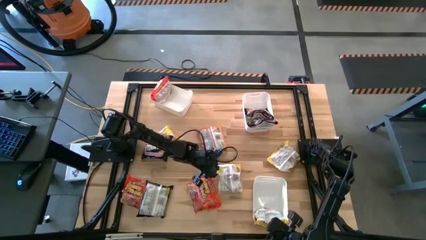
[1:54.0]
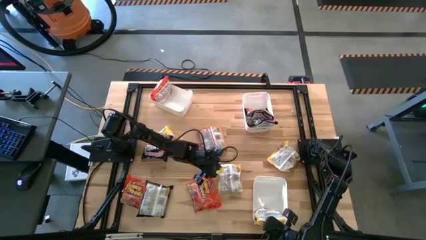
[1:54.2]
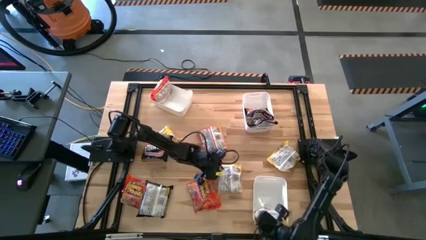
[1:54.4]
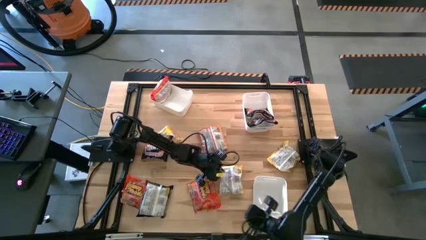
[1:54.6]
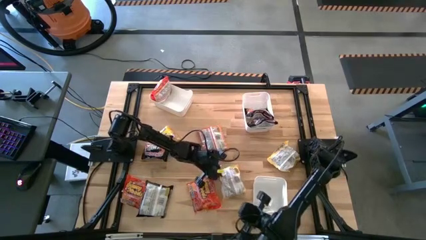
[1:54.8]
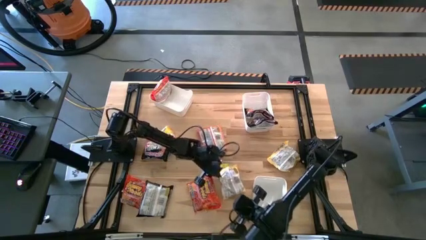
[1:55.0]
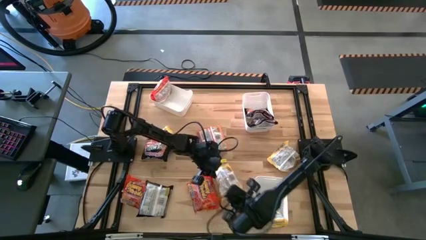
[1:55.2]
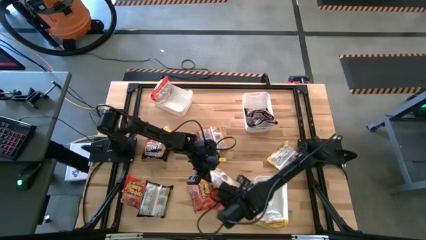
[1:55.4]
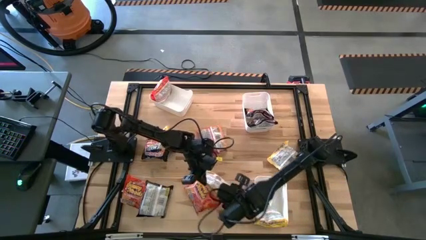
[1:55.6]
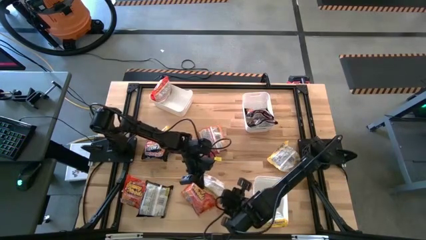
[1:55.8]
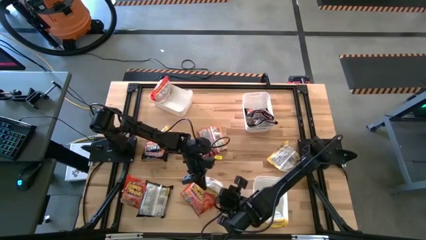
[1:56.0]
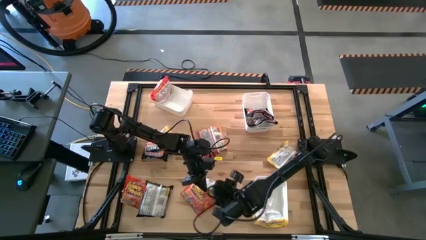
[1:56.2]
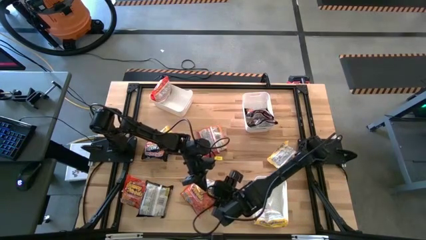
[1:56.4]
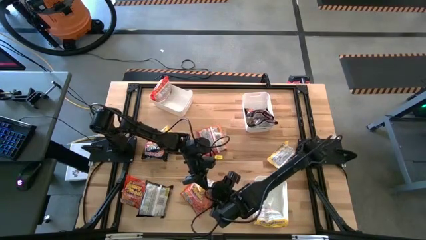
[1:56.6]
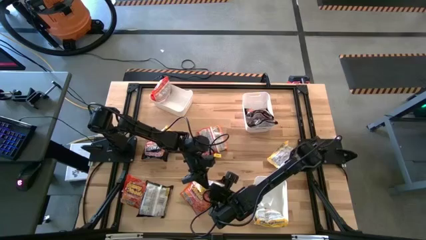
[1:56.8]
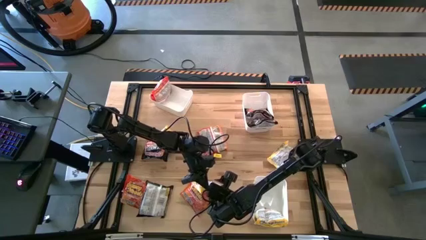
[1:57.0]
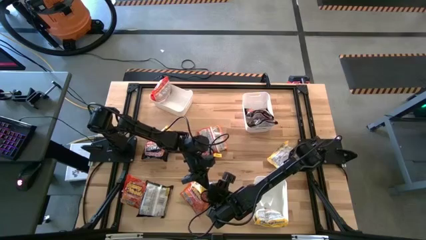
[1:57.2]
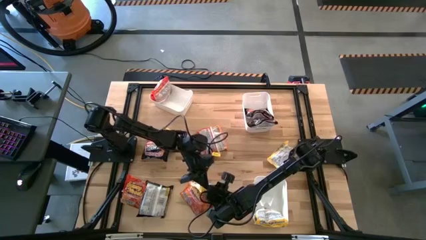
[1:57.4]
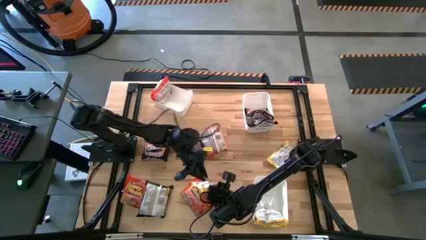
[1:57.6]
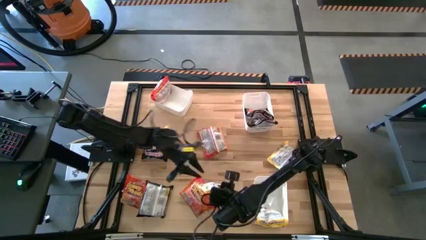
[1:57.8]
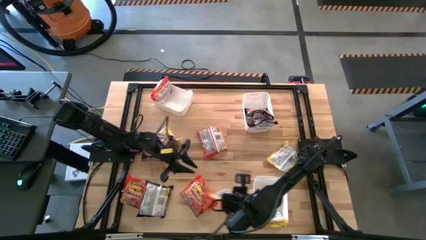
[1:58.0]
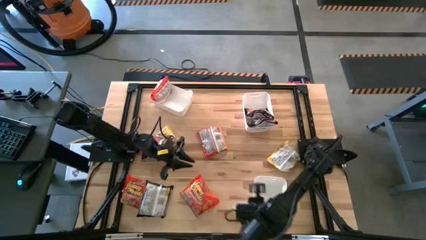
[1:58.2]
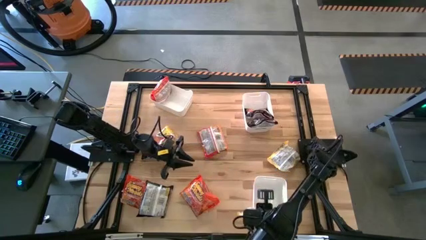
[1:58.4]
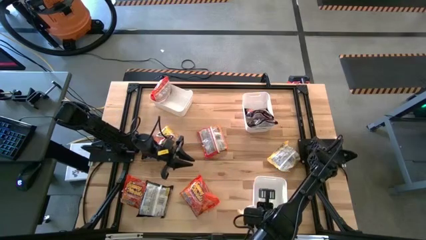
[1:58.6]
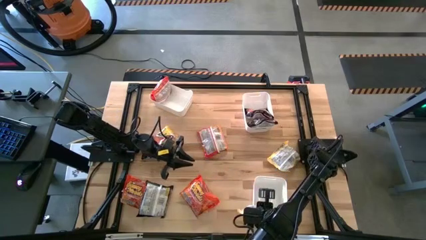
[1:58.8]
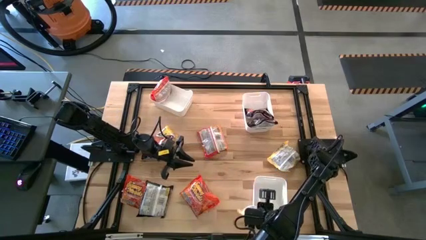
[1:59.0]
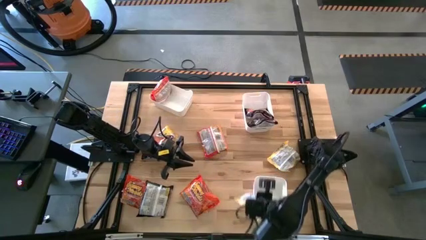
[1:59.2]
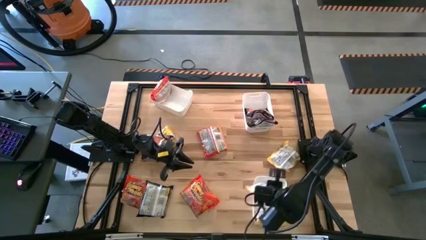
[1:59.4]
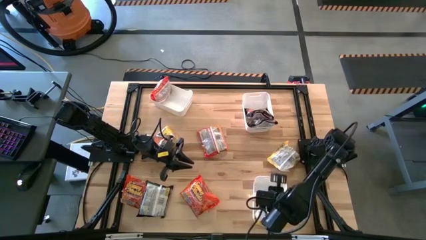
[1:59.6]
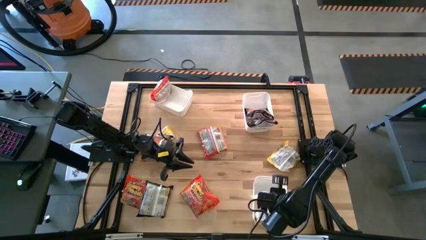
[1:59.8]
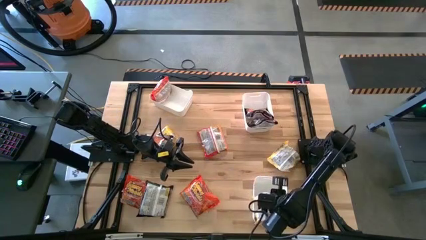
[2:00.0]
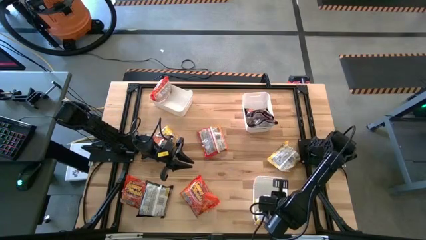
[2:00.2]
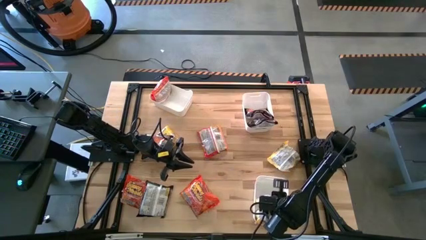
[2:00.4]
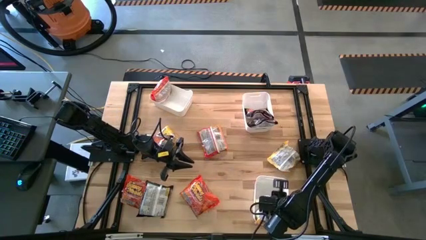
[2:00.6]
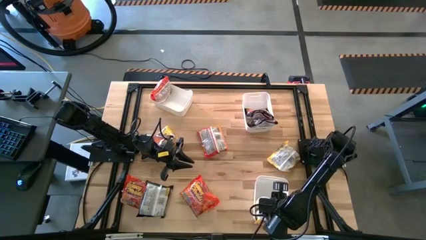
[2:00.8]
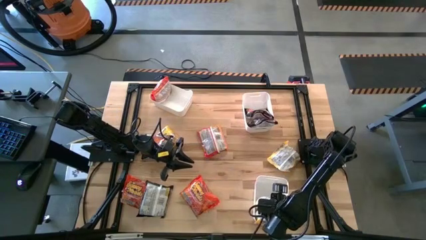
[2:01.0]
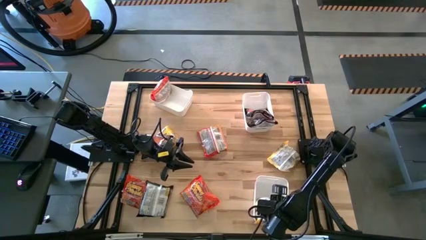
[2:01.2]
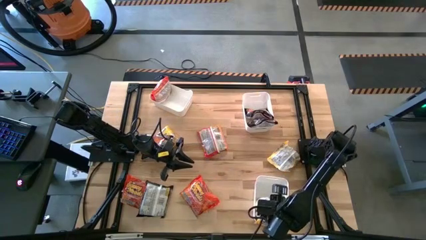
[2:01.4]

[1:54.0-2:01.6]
Task: Sort Maruchan noodles
Put the yellow noodle pack into the bottom white bin

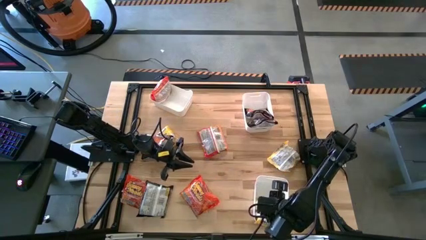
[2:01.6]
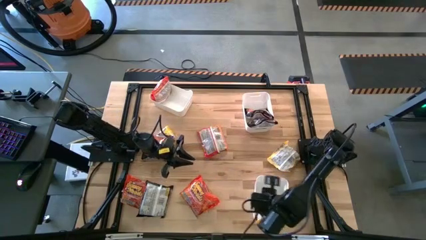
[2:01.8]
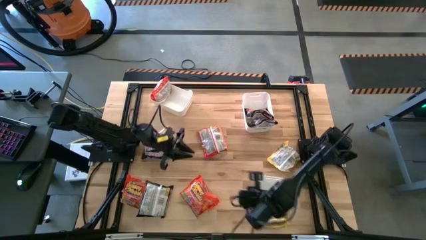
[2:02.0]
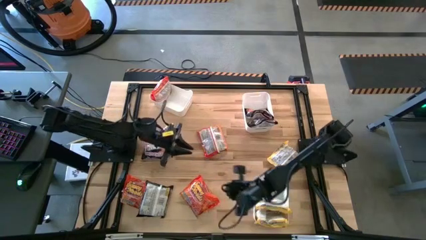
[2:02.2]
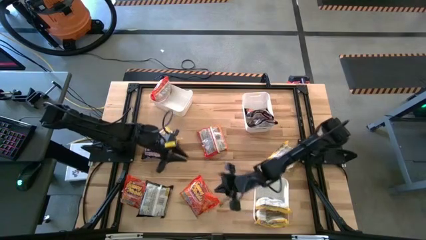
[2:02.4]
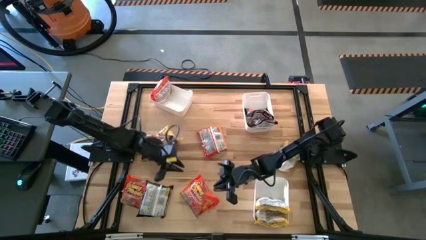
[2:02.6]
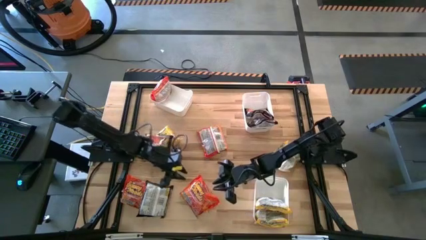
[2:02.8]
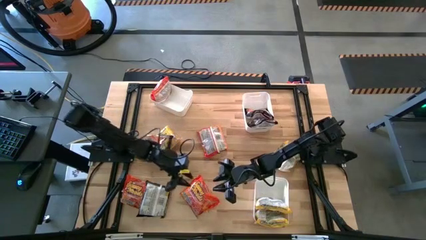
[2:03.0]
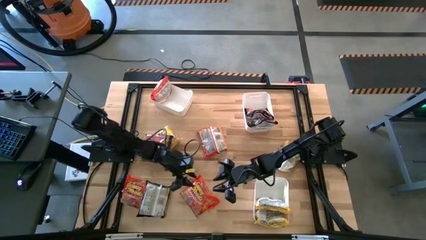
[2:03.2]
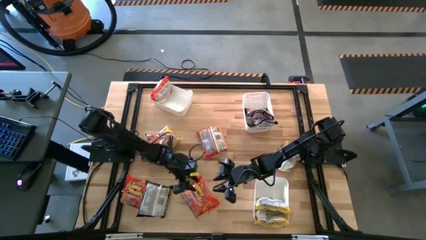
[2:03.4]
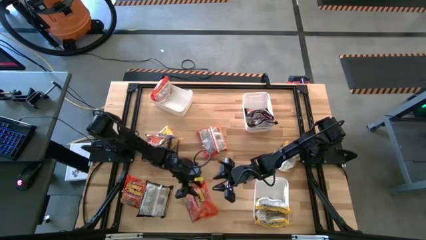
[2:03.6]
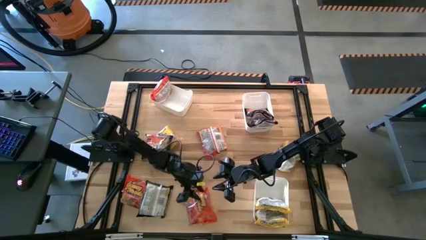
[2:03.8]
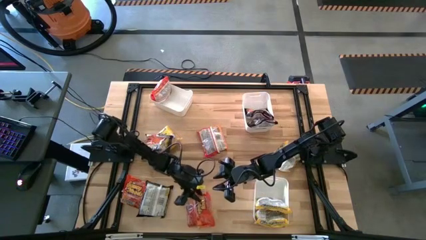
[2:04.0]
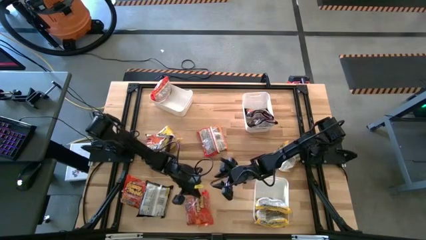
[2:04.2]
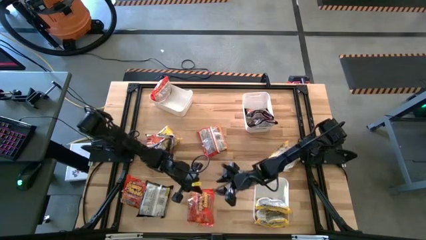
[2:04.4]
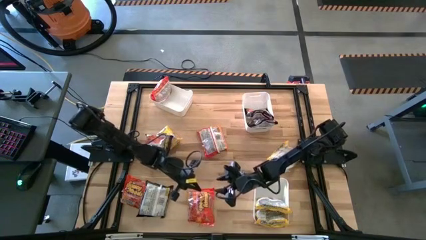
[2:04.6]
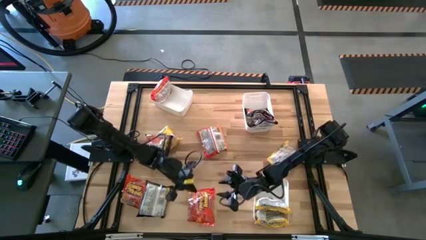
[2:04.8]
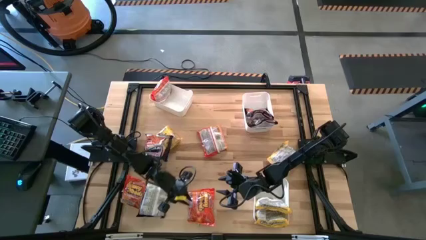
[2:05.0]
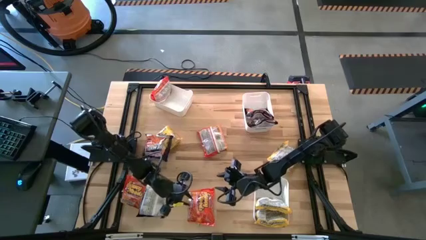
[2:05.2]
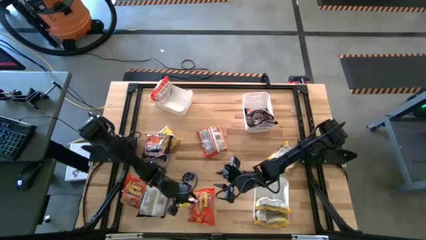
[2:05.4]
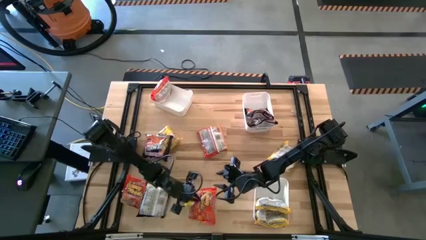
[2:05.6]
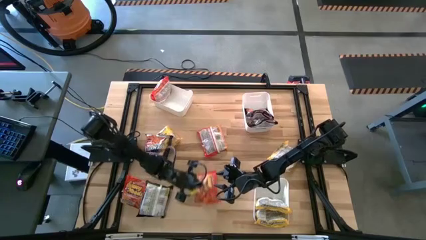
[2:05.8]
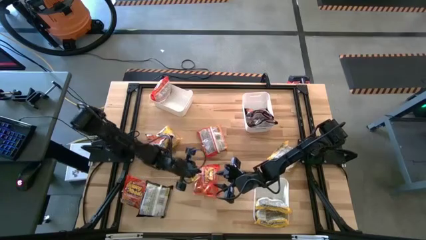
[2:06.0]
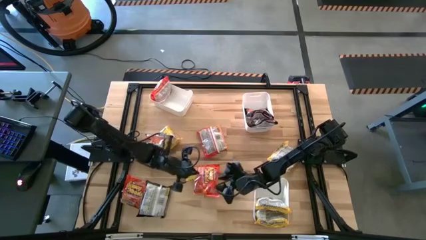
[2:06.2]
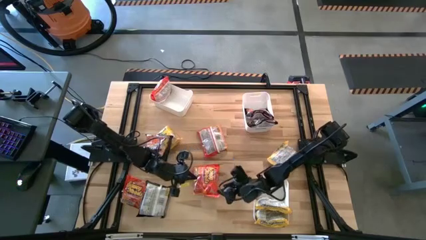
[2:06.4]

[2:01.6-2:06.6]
Put the orange noodle pack into the top left white bin

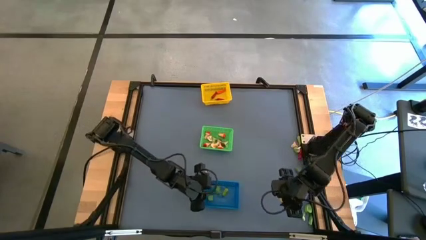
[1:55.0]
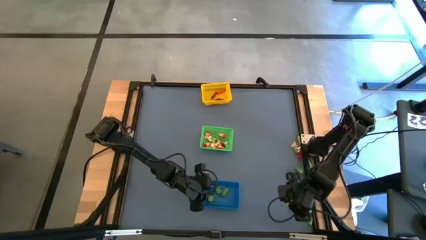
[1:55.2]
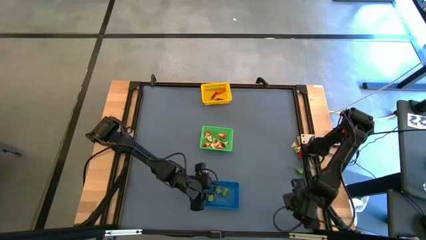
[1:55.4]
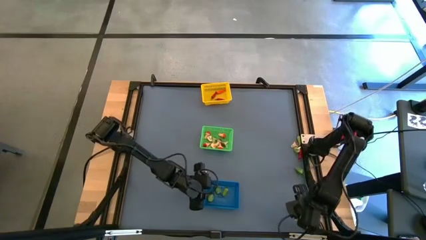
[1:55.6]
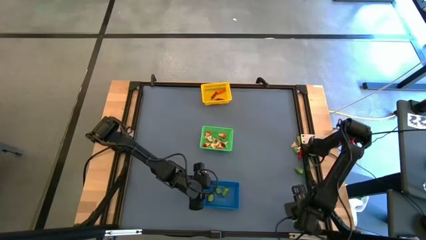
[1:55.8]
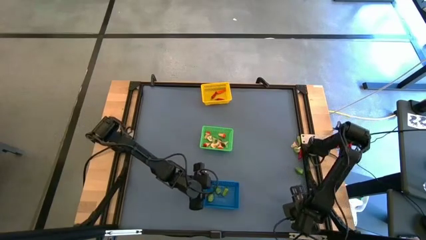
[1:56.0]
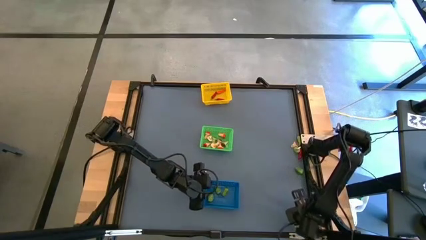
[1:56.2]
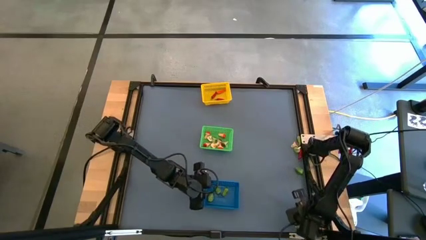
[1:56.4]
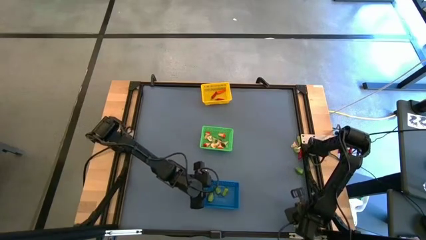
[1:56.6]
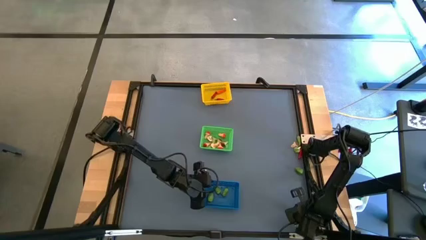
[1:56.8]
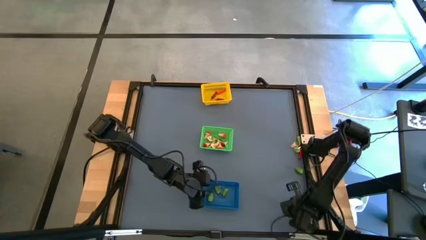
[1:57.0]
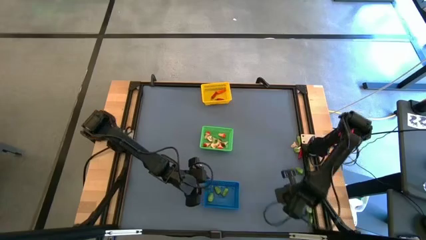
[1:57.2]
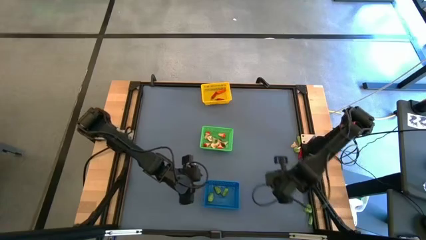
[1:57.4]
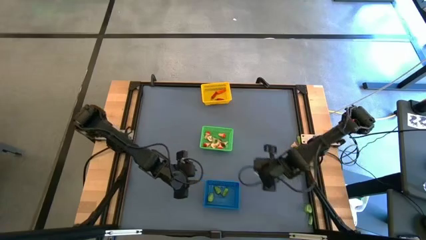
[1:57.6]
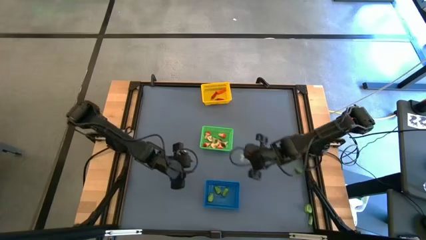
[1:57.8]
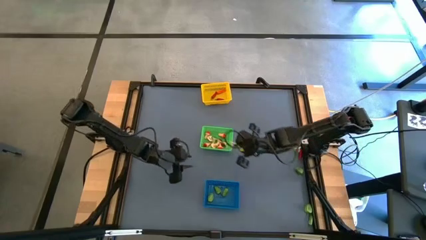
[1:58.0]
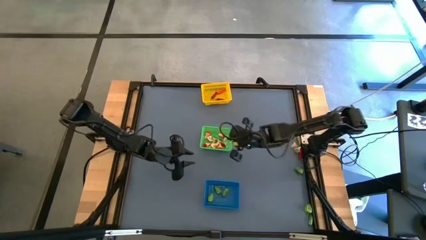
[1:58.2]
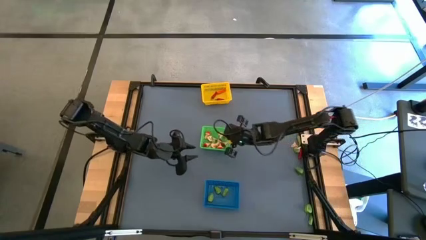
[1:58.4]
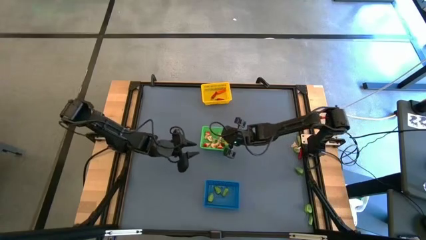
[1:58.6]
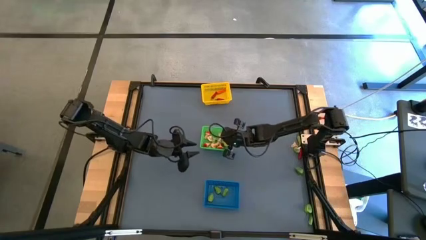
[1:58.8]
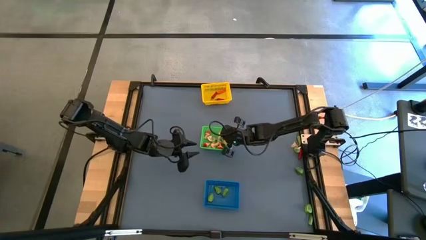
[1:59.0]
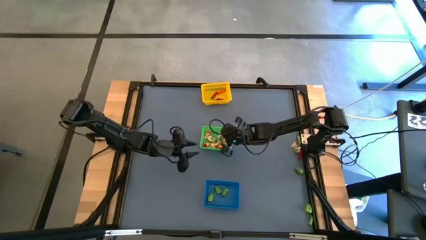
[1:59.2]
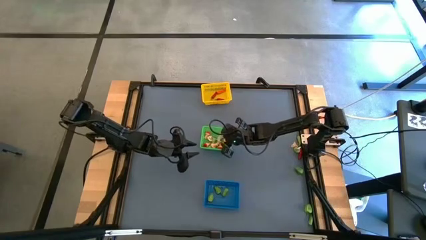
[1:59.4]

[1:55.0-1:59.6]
Task: Sort produce into baskets
Put the green mushroom into the green bin

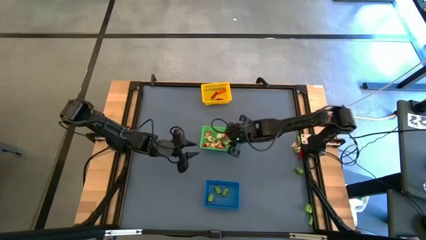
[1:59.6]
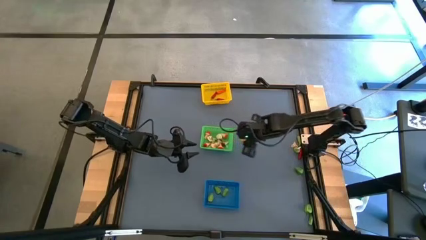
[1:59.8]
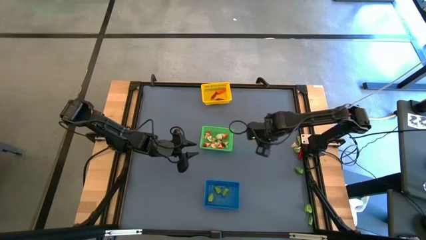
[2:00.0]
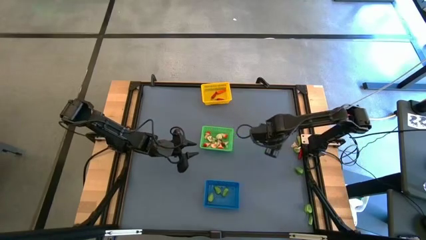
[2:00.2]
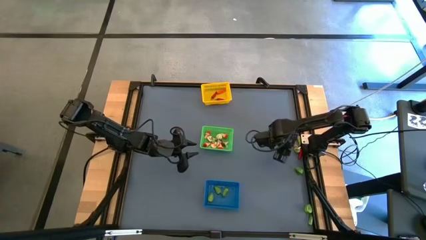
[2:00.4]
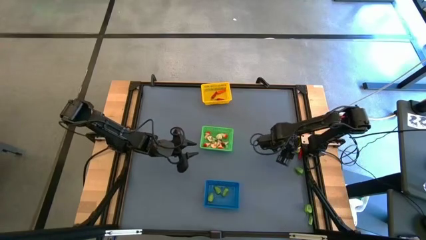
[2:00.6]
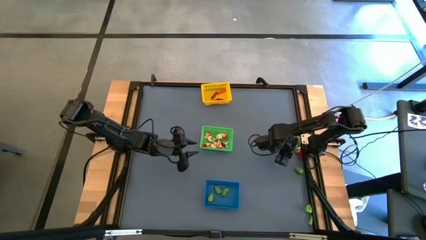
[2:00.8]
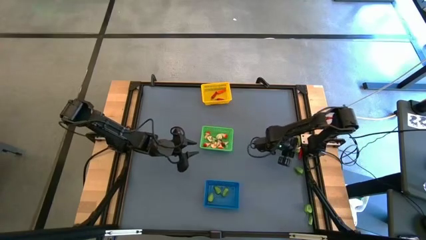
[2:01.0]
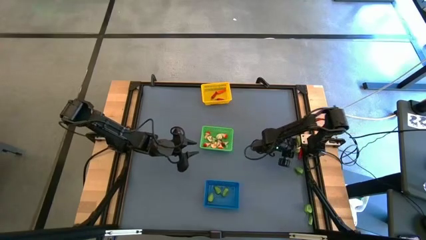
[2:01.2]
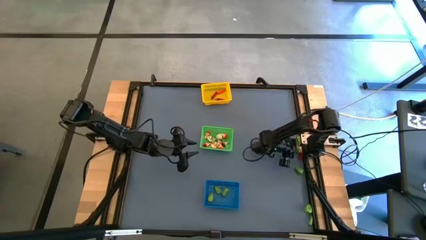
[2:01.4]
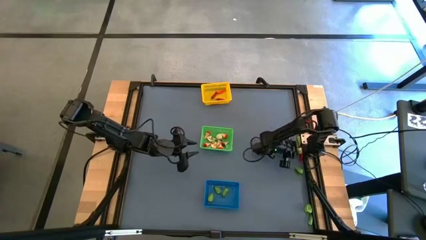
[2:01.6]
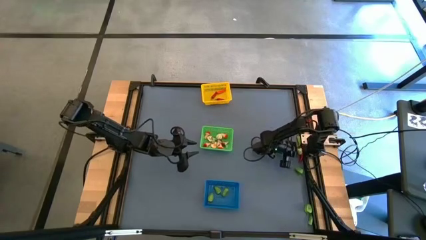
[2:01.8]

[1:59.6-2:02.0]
Put the green mushroom into the green bin
